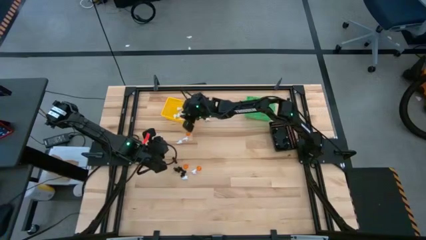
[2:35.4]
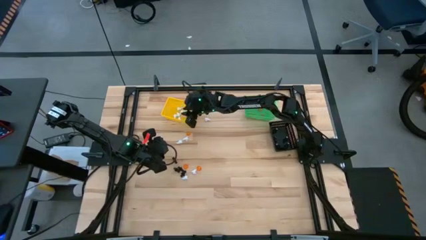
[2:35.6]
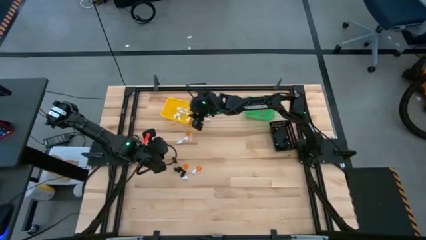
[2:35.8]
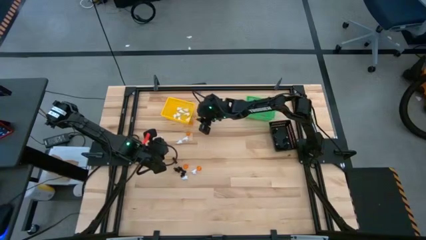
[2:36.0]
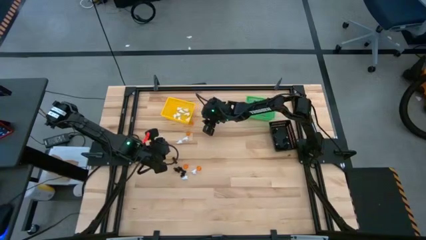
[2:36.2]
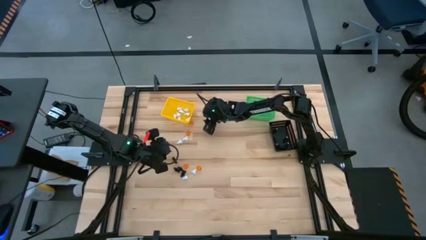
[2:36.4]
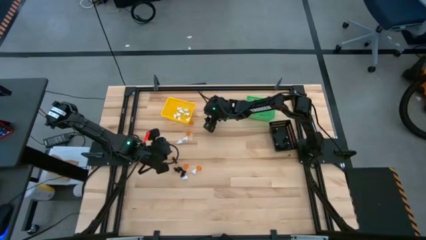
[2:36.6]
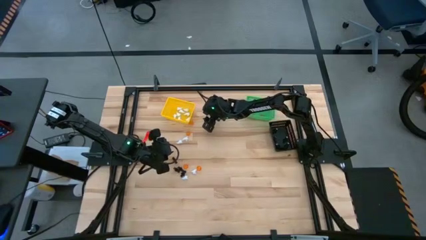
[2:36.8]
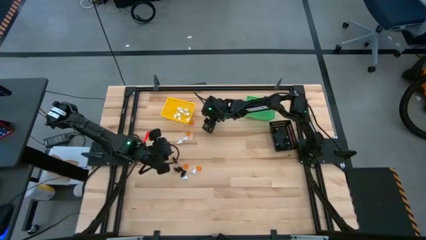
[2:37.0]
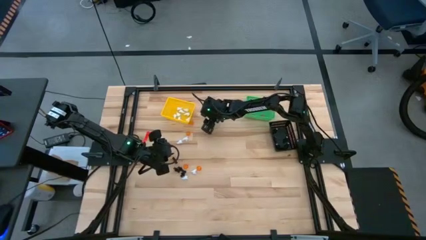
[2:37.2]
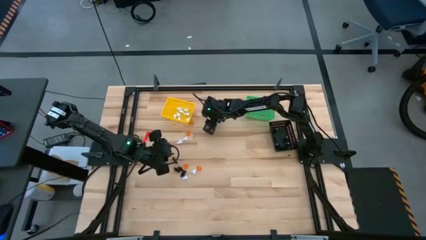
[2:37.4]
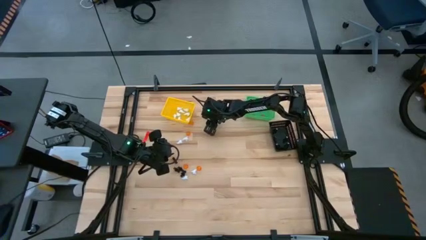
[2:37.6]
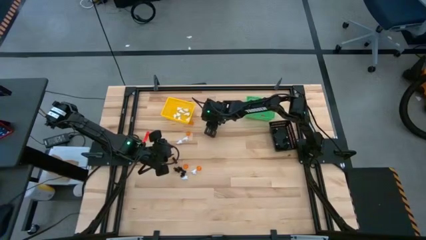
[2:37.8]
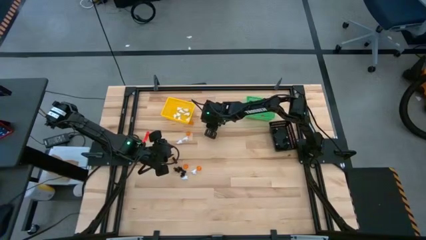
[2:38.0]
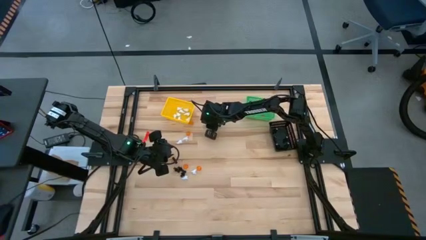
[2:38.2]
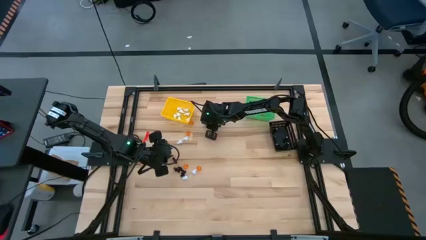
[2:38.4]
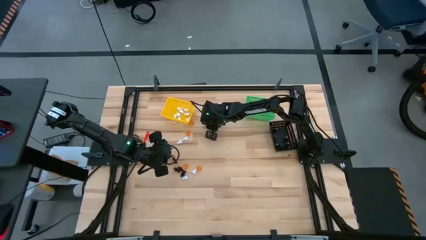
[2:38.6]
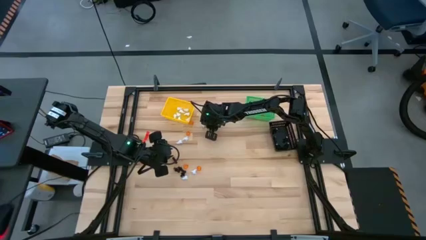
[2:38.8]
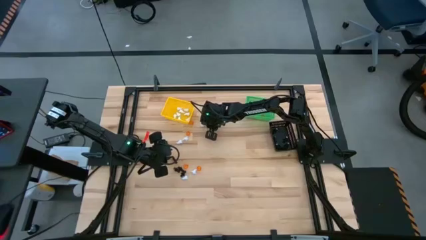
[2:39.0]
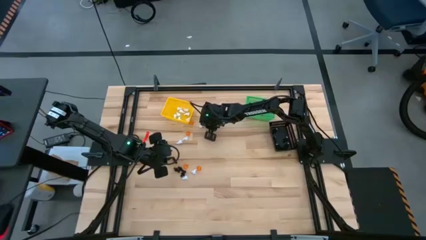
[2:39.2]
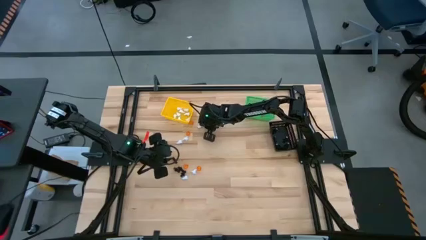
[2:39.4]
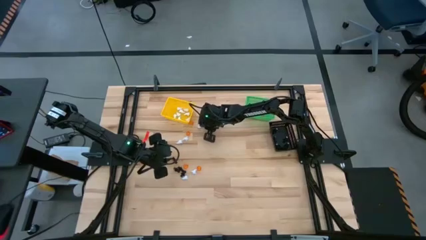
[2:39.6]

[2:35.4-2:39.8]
Task: Sort Halloween decoration
Put the white ghost toy into the yellow bin

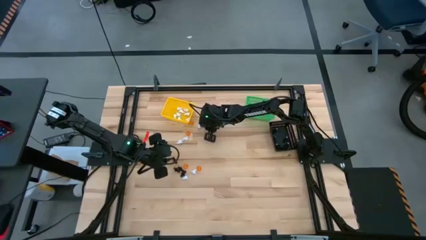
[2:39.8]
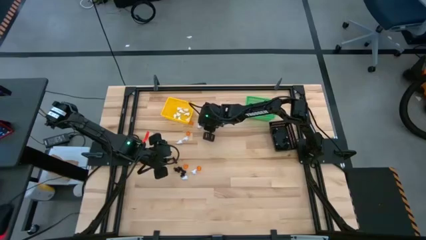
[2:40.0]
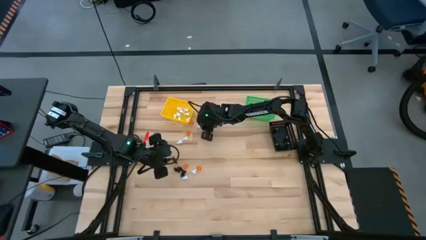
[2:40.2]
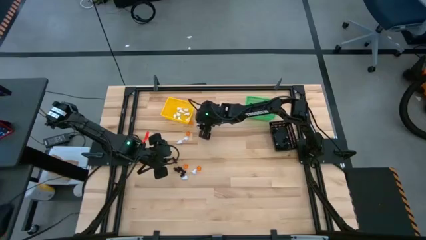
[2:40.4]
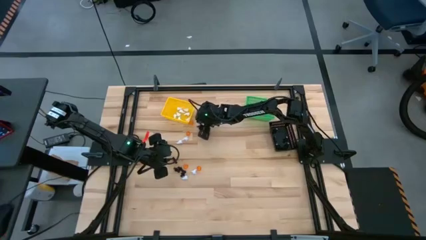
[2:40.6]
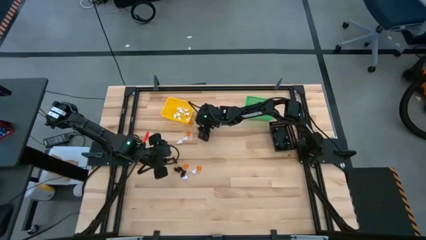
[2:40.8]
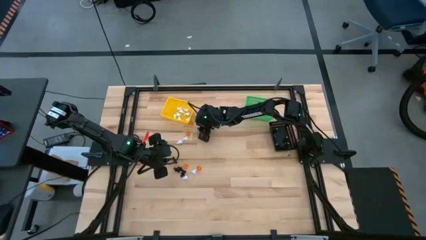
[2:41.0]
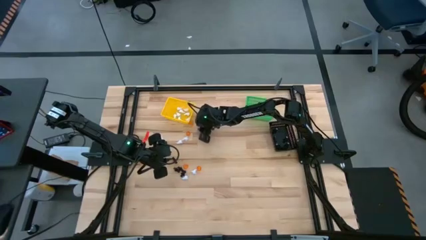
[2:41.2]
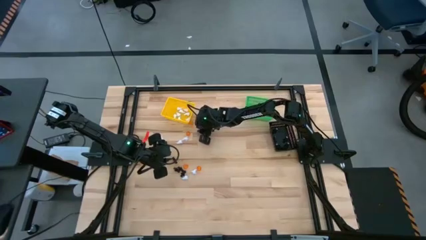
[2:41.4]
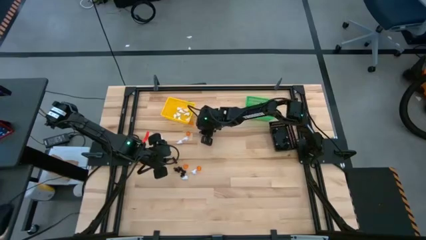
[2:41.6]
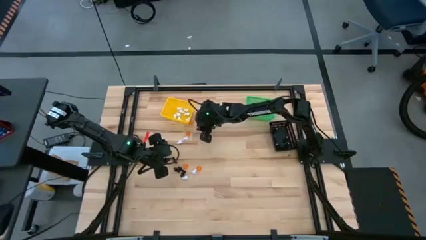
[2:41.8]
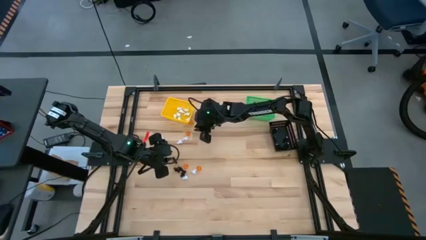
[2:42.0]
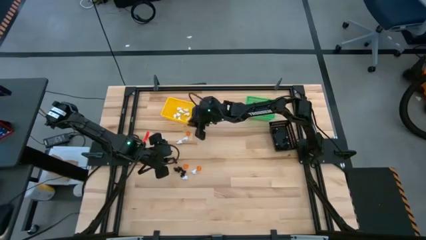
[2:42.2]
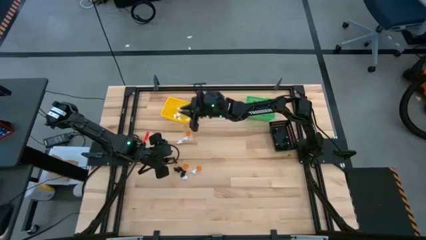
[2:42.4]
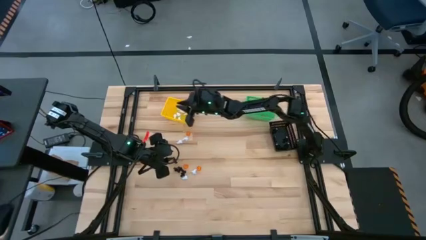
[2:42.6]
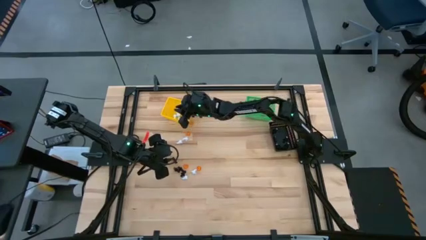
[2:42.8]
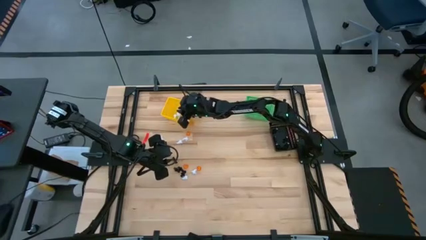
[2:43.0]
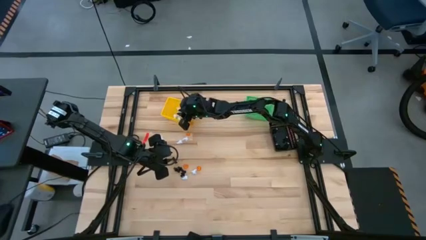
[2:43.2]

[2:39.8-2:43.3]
Put the white ghost toy into the yellow bin

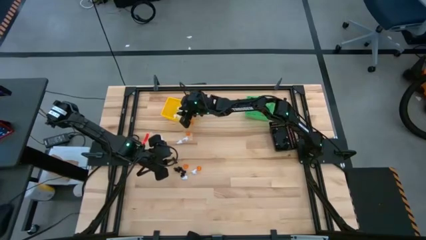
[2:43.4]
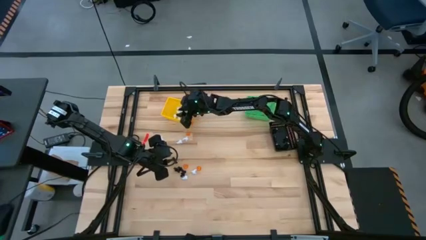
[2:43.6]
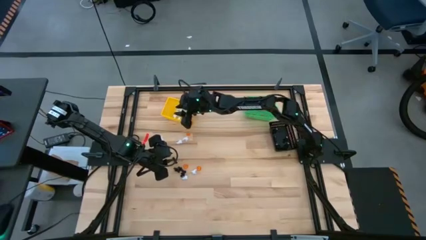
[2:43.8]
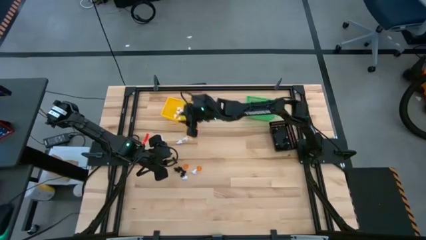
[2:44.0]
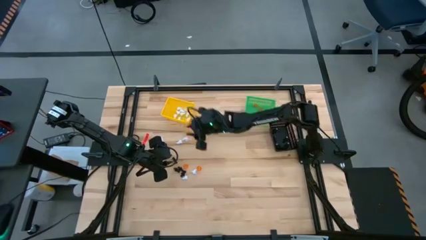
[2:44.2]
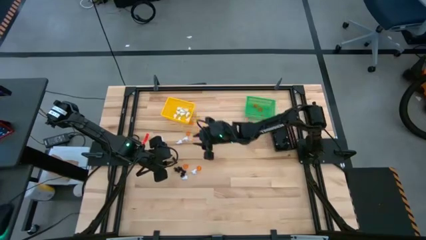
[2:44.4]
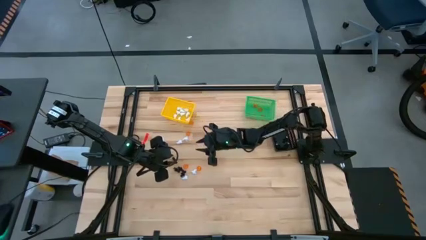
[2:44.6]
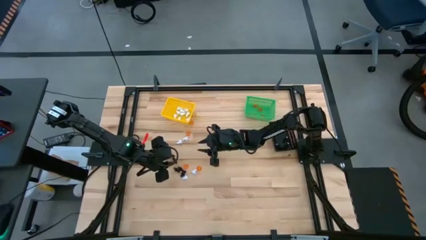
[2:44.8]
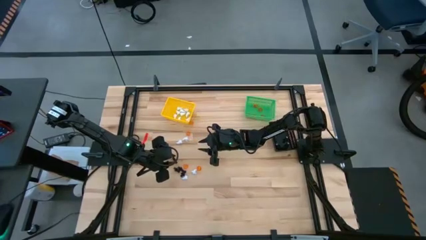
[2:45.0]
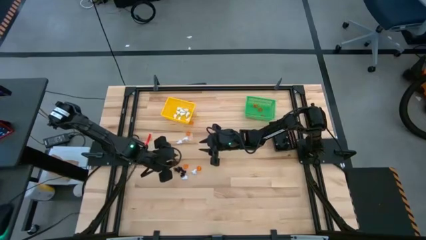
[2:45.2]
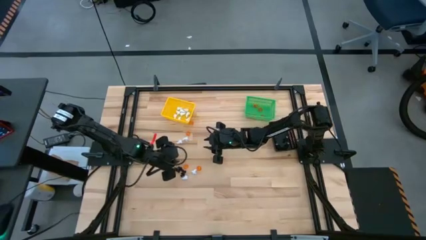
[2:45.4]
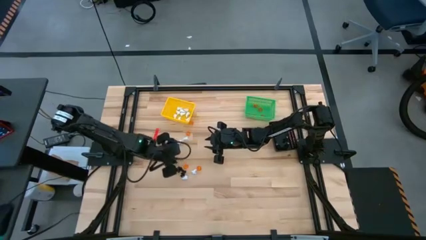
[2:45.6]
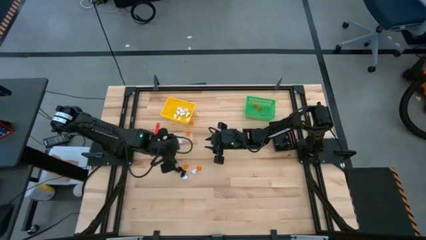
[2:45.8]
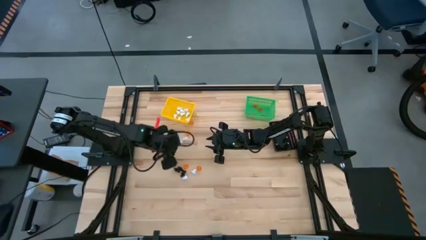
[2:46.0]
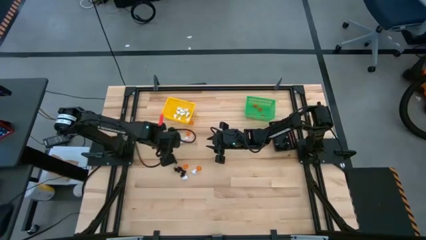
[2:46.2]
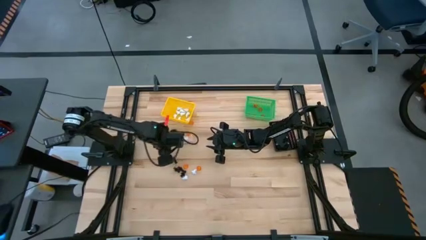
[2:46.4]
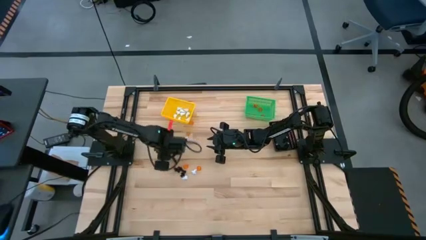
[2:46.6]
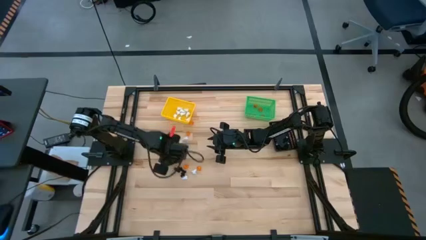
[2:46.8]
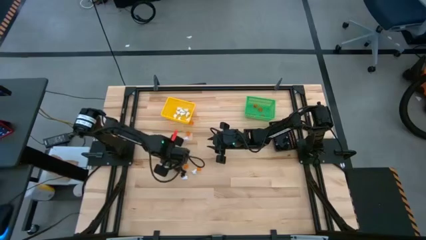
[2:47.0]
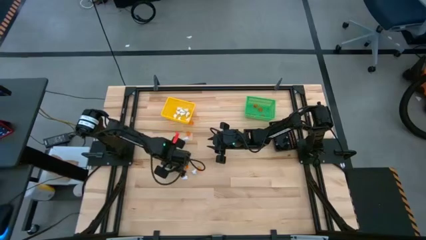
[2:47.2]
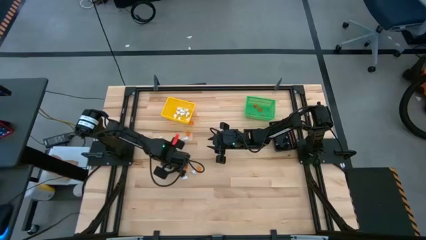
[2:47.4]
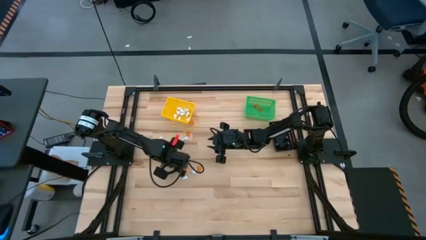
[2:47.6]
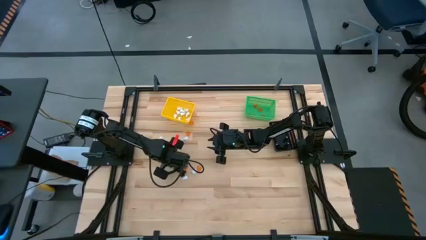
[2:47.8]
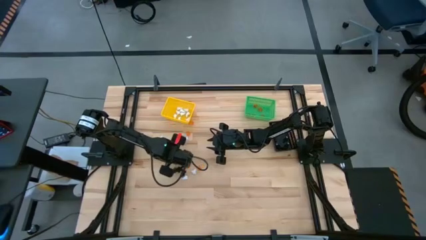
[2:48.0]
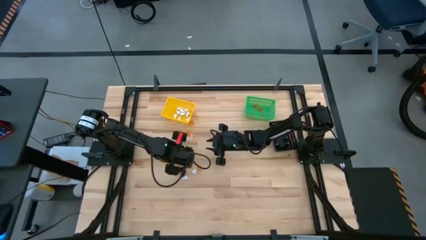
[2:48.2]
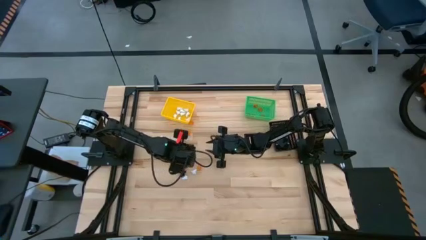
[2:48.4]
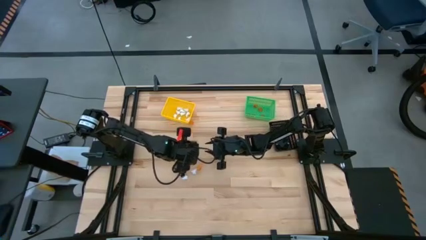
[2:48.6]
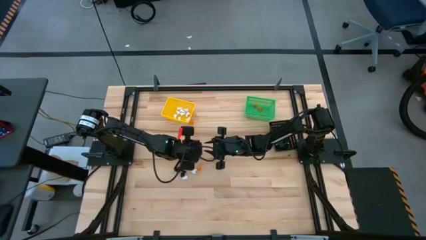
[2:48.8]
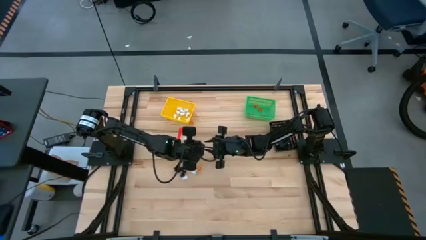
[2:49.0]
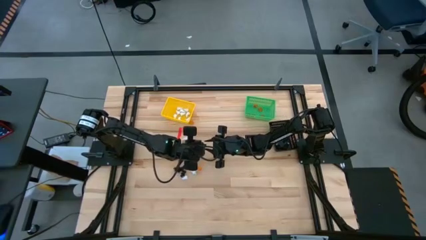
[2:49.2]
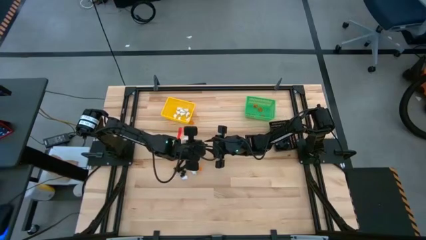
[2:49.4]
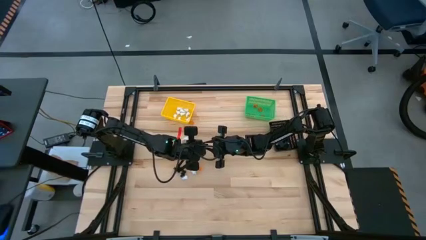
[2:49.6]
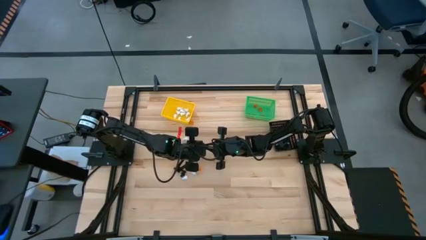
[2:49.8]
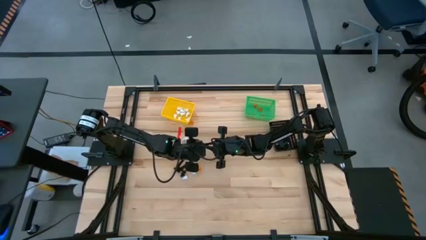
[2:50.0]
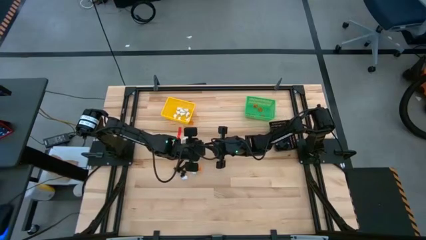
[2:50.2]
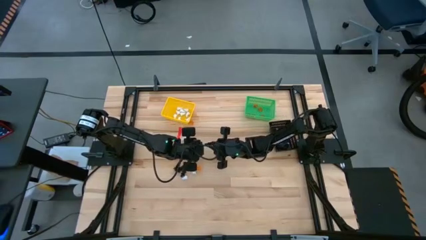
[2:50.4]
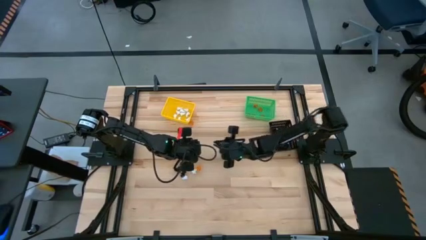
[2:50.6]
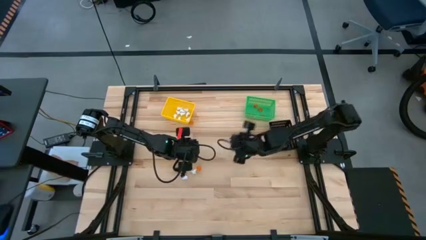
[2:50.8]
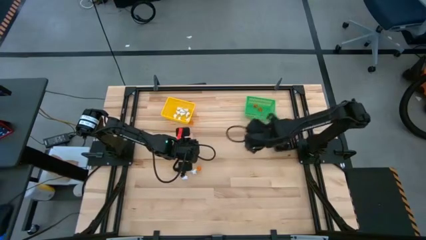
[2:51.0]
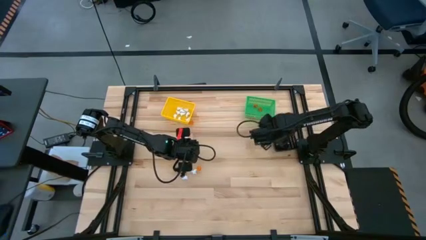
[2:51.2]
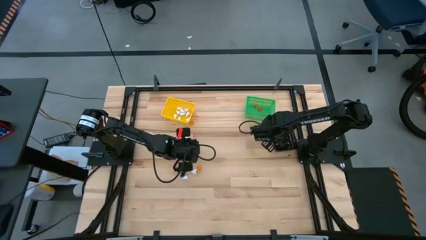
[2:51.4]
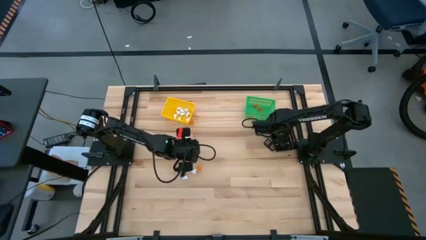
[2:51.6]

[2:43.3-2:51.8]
Put the black skeleton toy into the black bin
